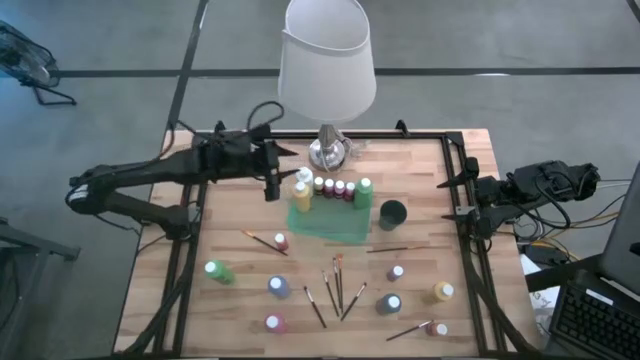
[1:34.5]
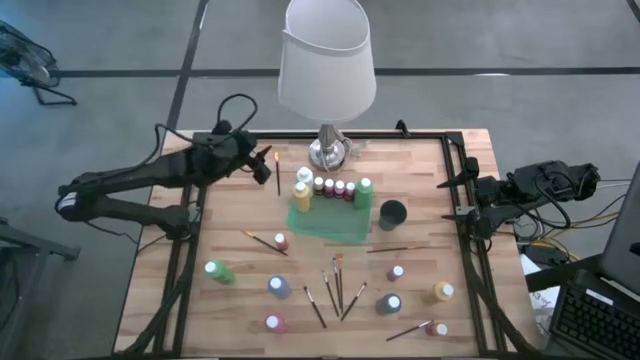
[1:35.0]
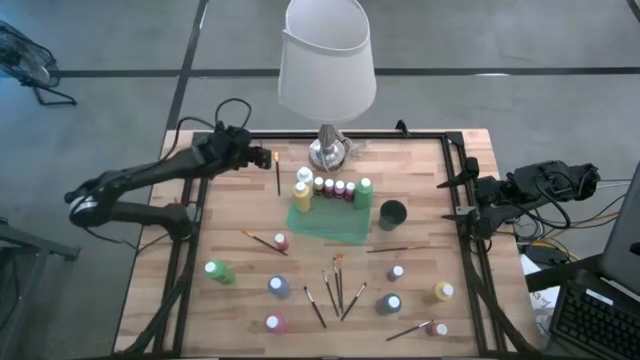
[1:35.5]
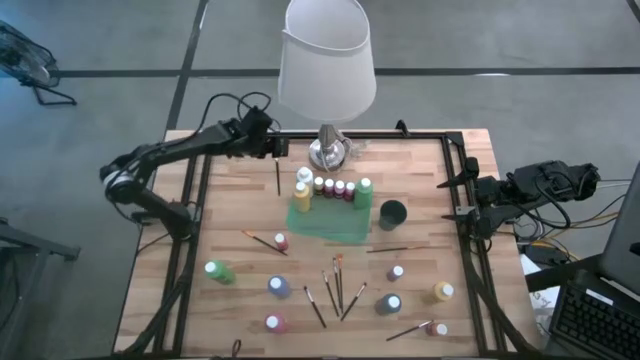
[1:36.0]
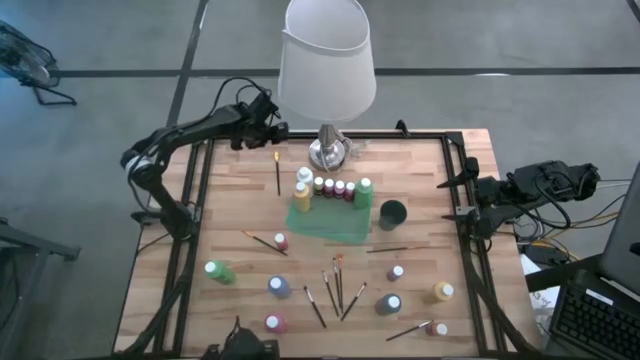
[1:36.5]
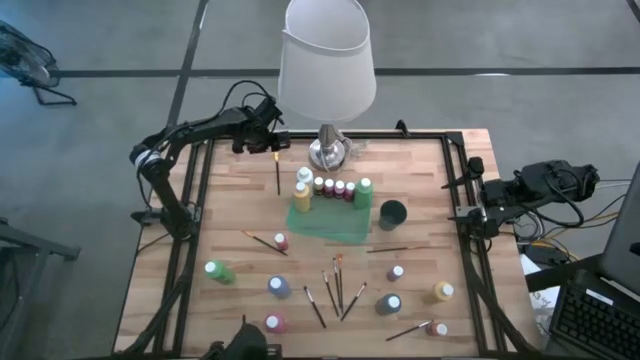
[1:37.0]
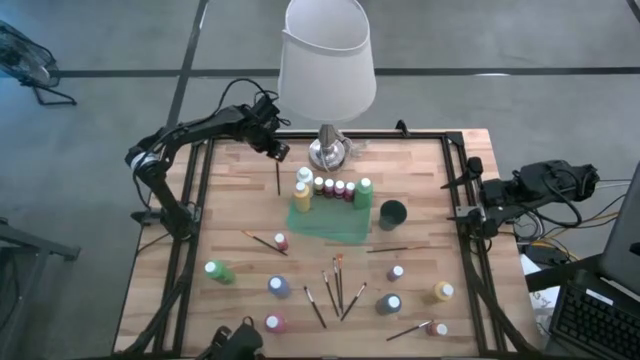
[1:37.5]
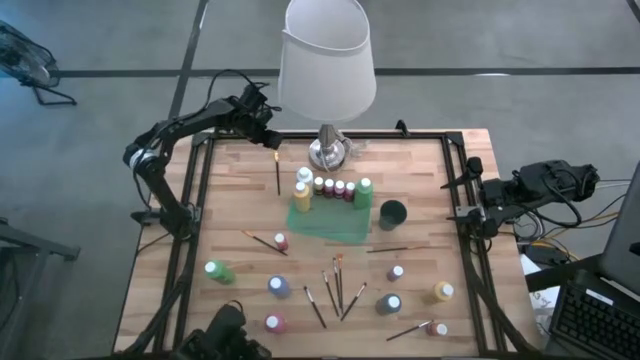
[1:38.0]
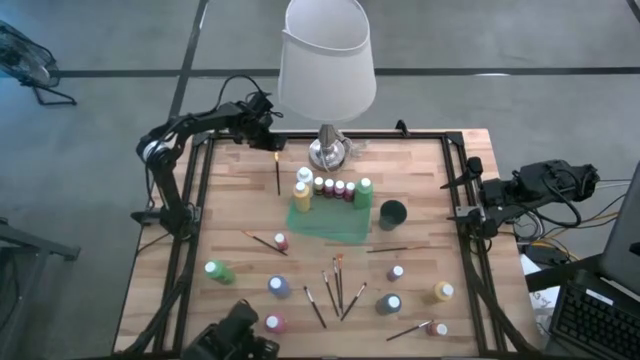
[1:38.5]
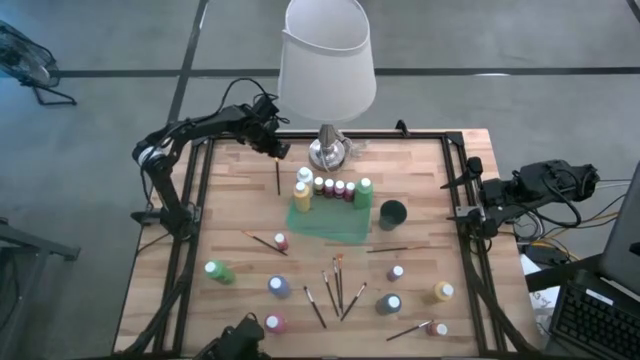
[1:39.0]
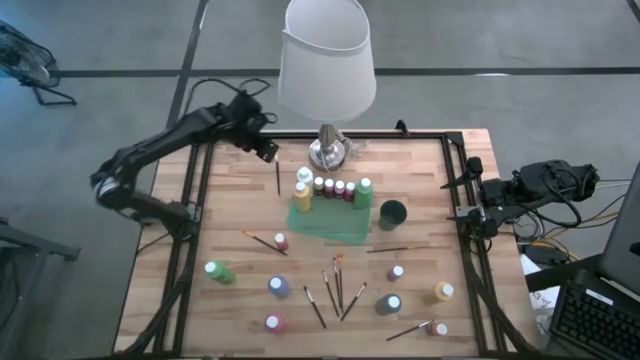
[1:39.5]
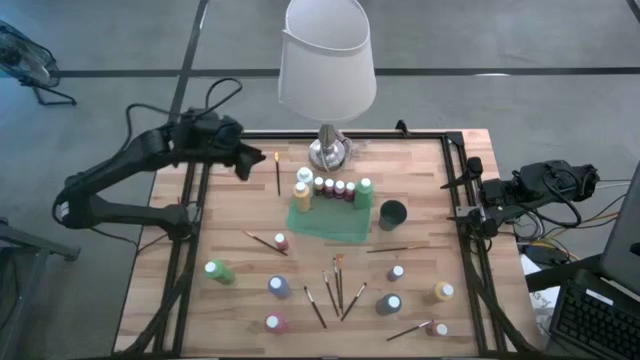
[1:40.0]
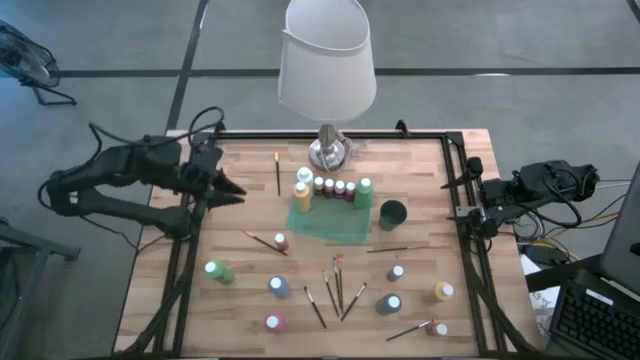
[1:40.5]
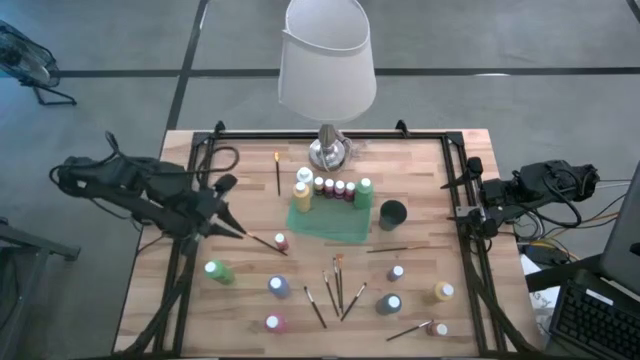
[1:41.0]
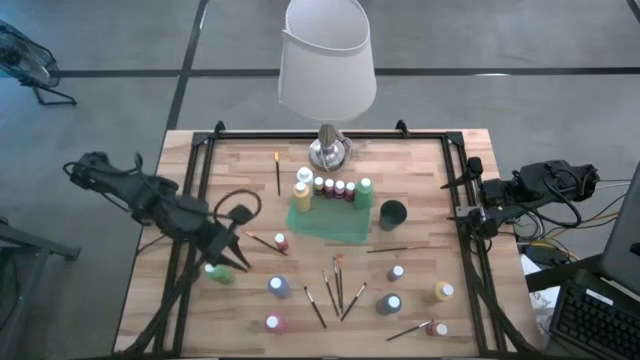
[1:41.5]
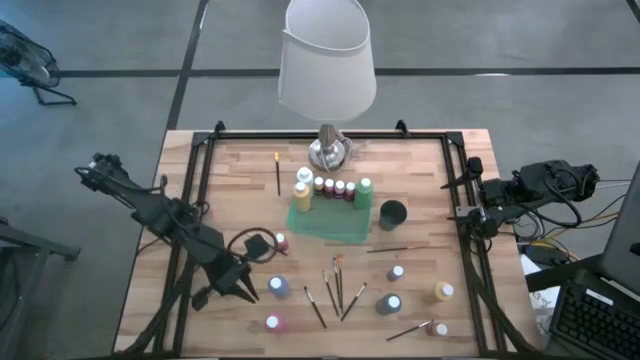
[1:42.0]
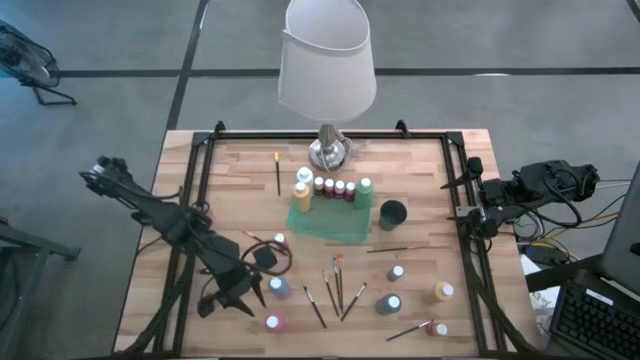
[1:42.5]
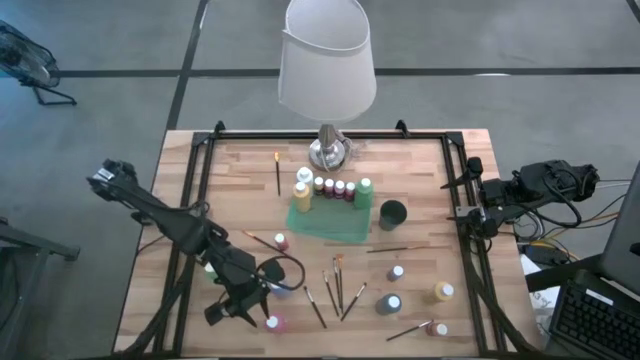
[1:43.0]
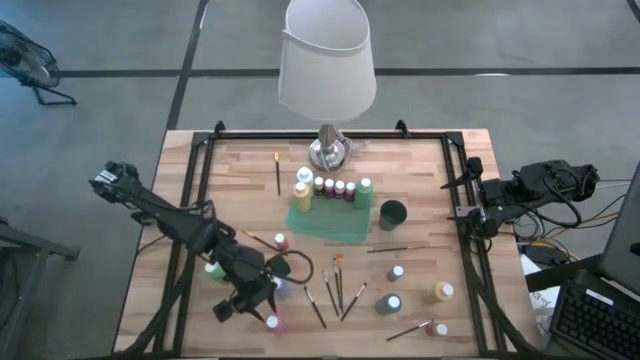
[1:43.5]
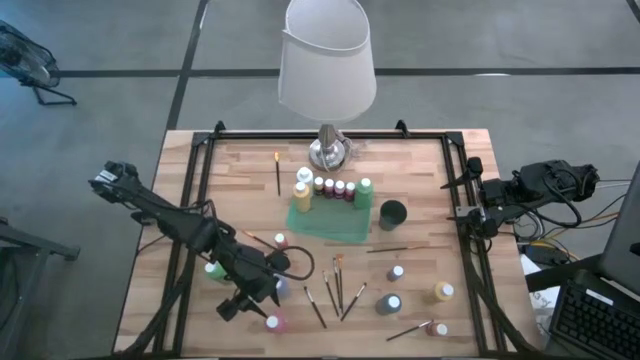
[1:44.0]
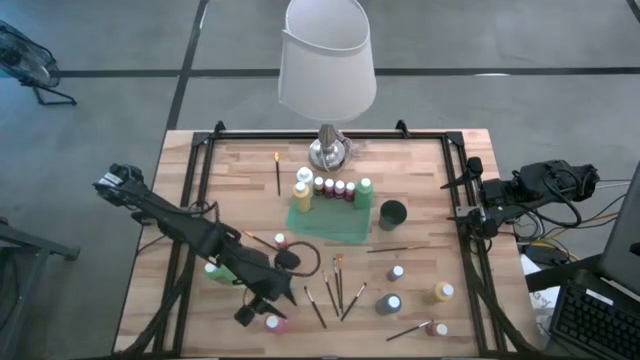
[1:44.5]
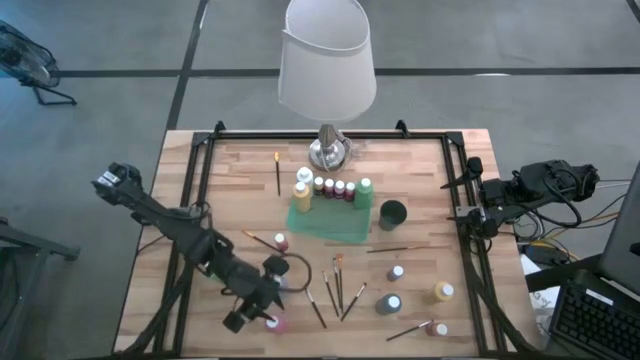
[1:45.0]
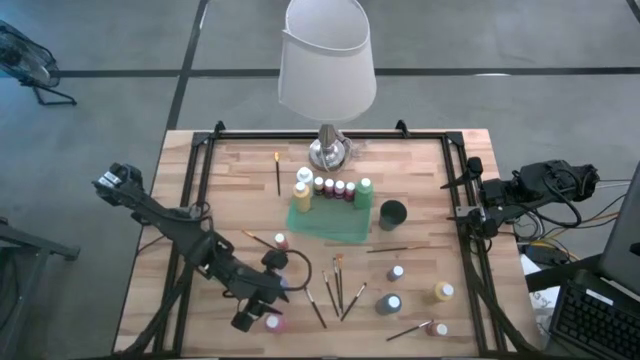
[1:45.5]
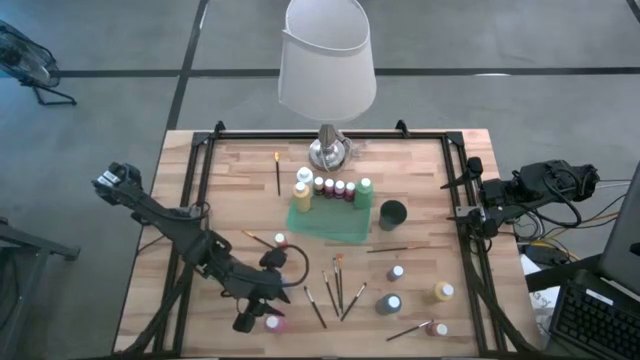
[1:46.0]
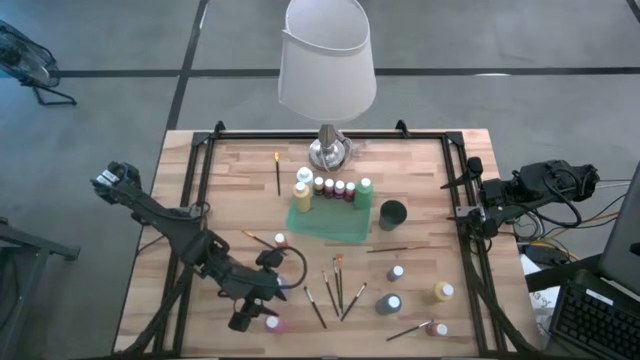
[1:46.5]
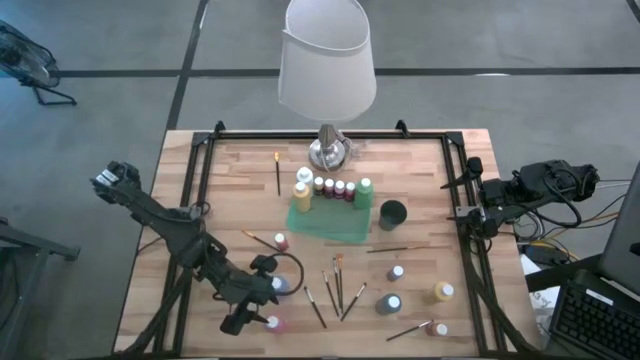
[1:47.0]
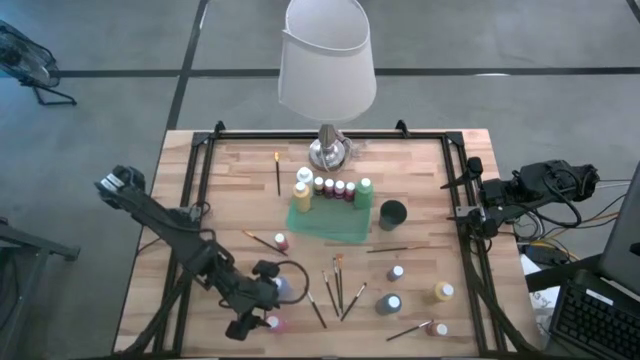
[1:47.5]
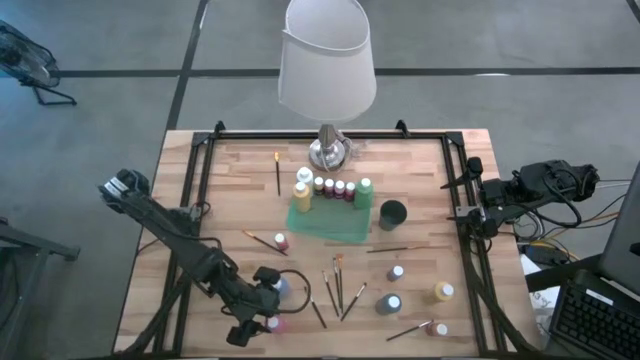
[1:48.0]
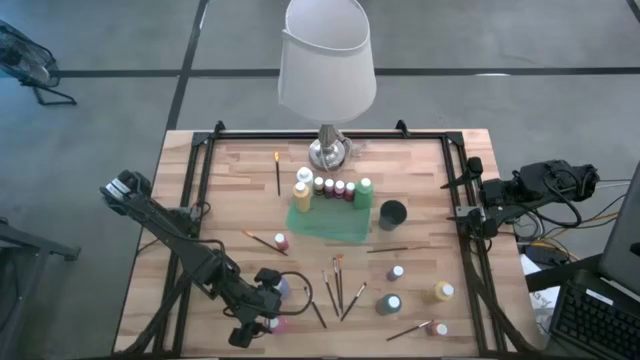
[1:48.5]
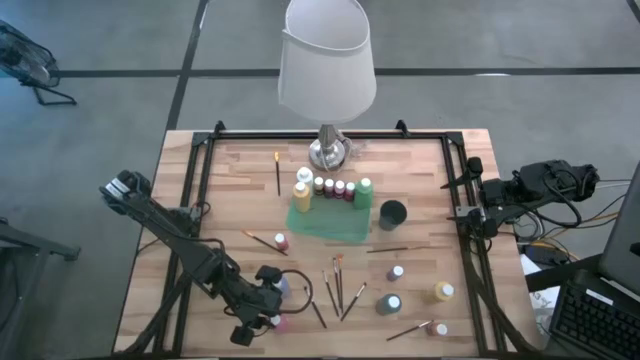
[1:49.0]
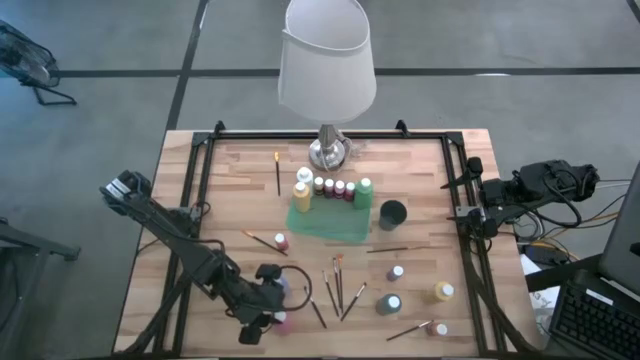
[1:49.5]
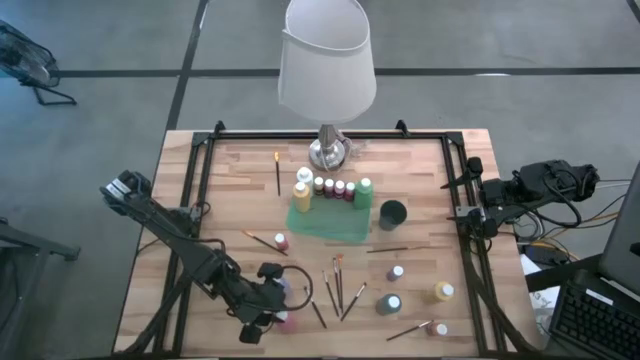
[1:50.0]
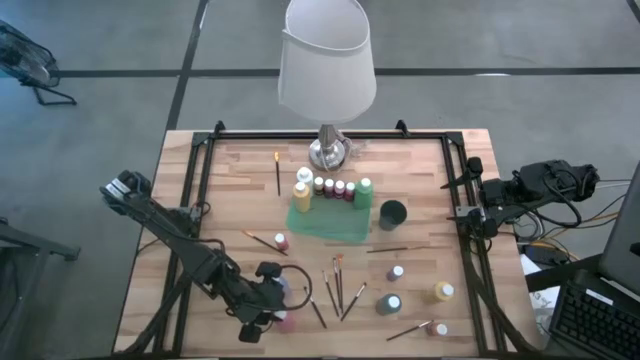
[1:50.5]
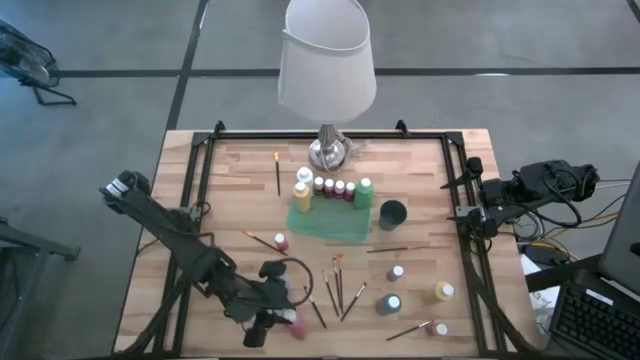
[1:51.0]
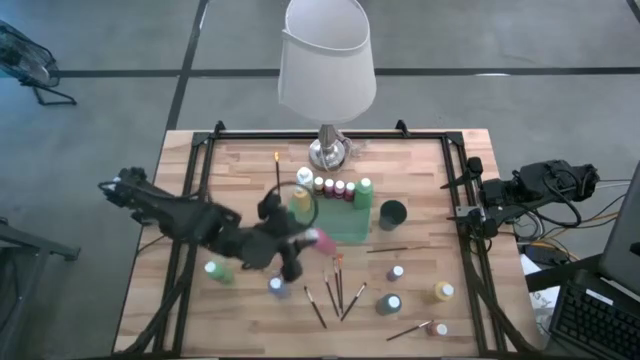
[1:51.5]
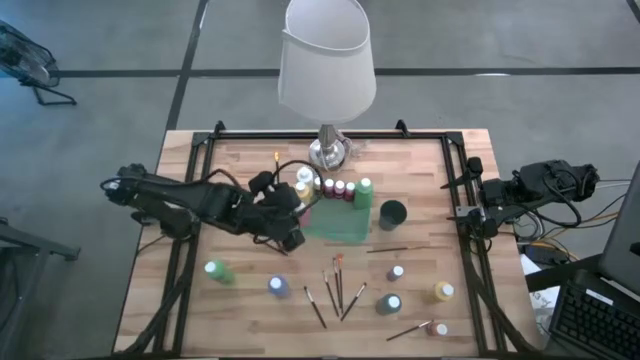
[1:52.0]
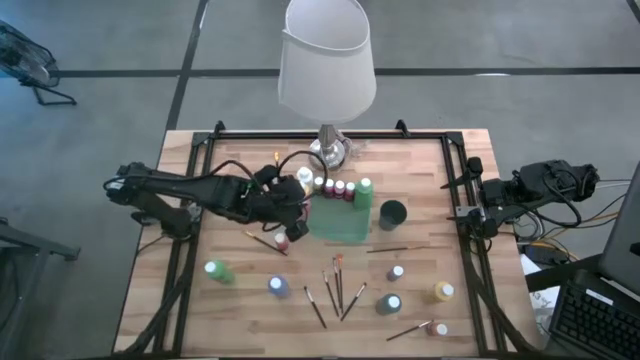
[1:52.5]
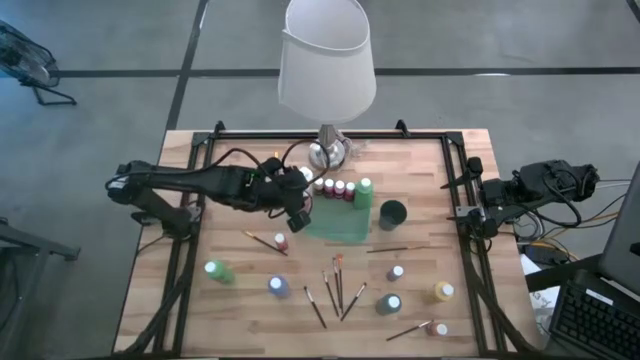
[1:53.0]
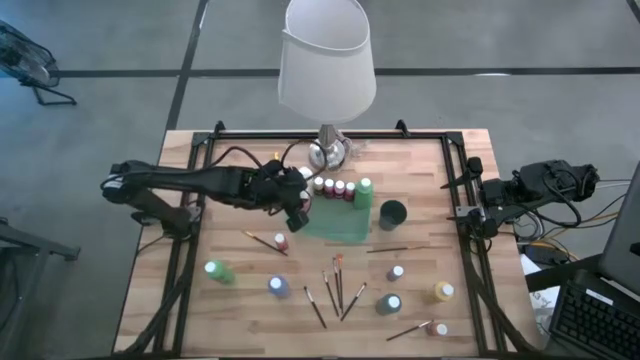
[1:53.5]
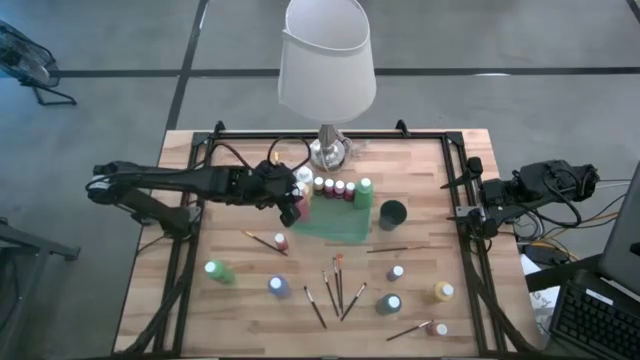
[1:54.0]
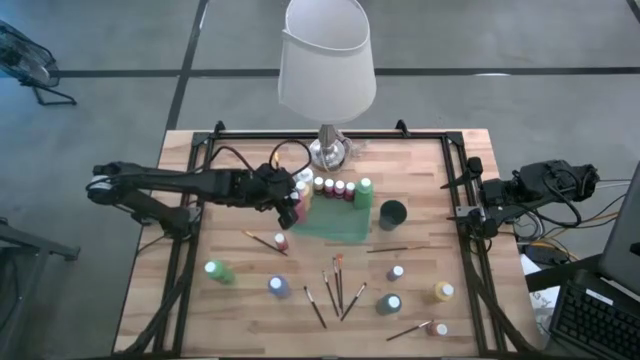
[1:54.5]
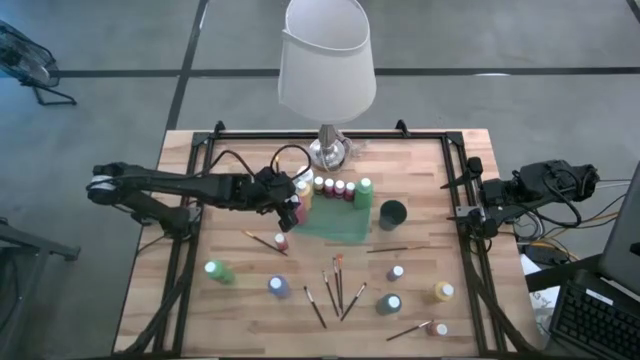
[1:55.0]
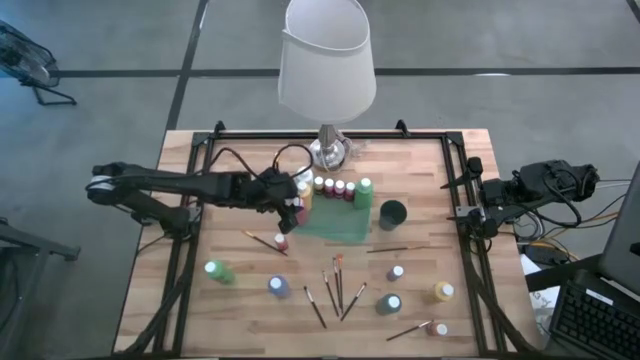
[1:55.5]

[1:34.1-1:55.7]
Task: Pick & Place Paint Supplies
Put the pink paint bottle into the green bin
